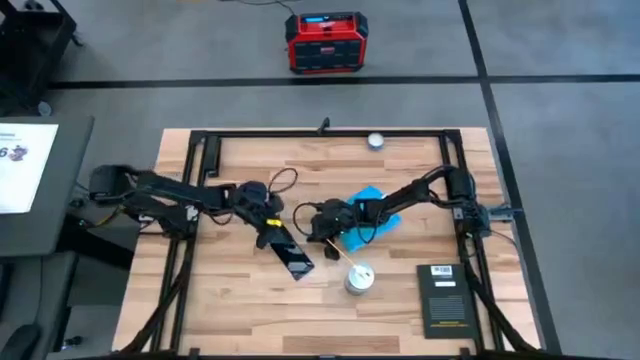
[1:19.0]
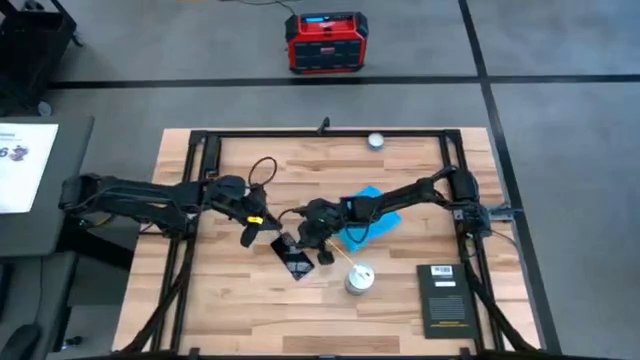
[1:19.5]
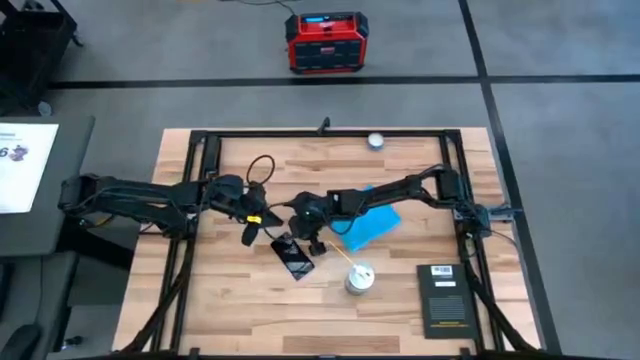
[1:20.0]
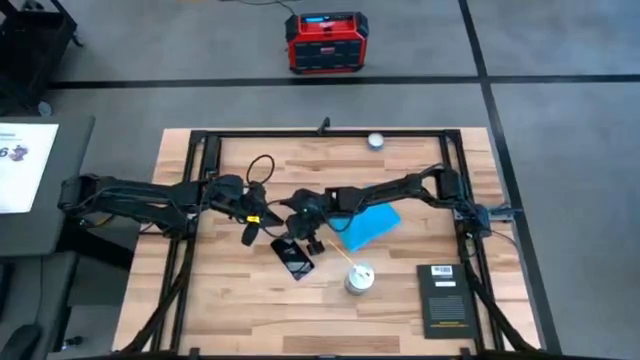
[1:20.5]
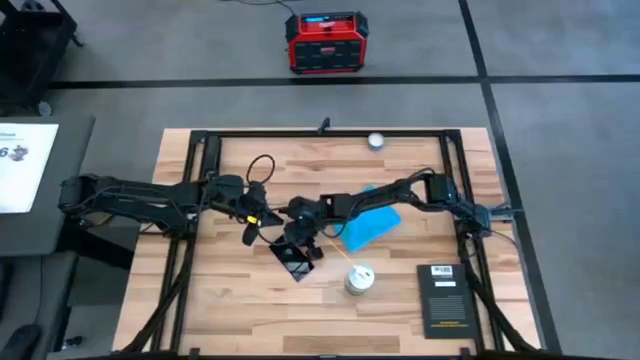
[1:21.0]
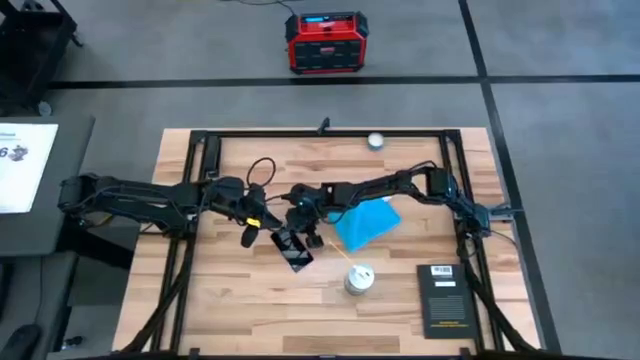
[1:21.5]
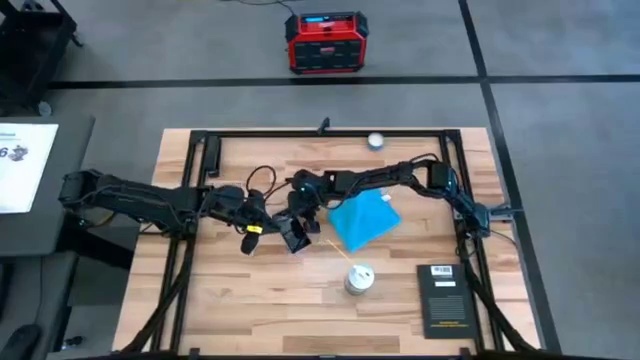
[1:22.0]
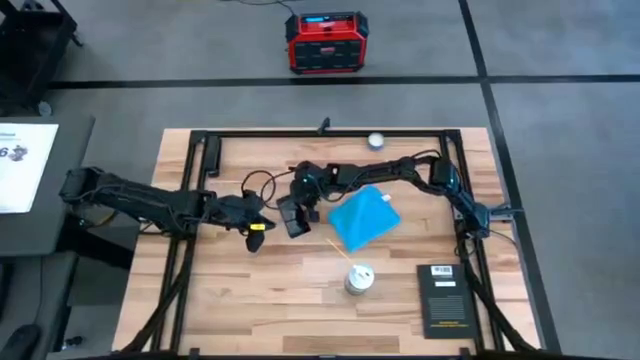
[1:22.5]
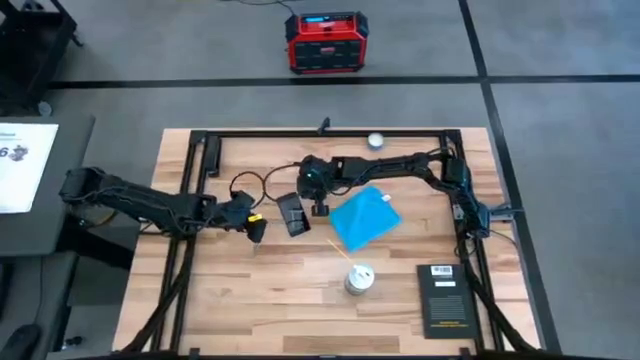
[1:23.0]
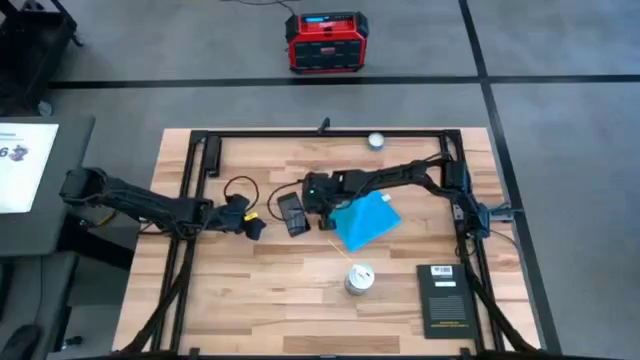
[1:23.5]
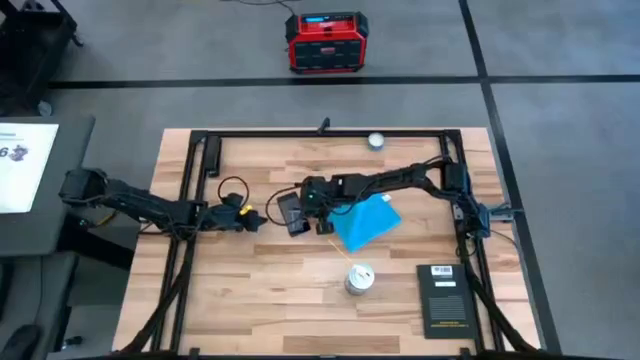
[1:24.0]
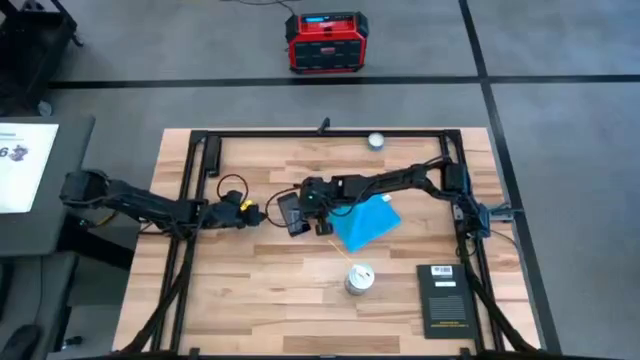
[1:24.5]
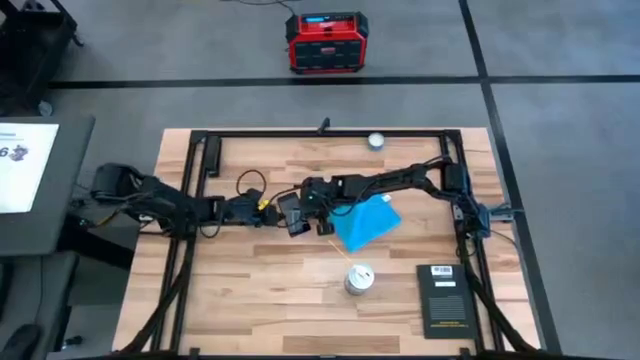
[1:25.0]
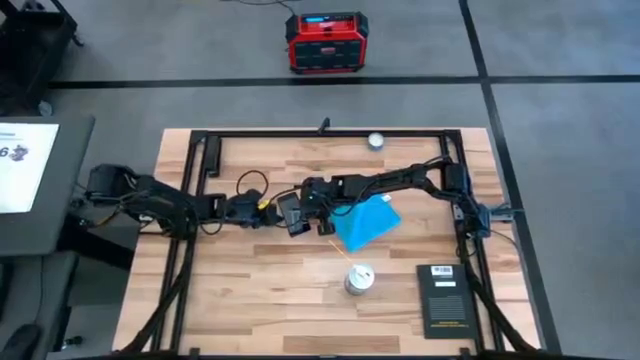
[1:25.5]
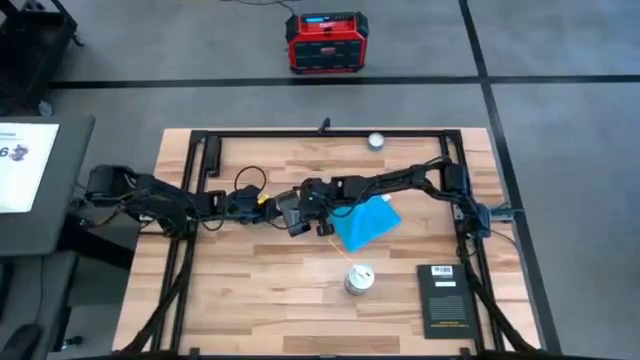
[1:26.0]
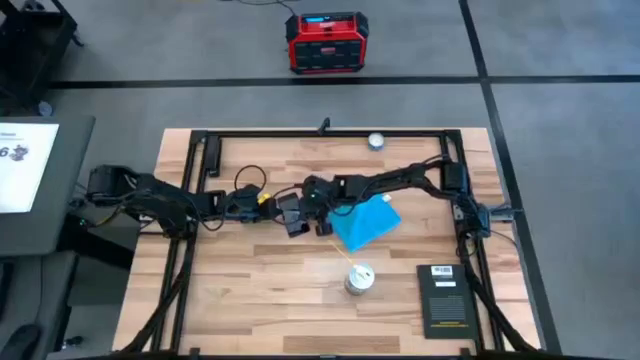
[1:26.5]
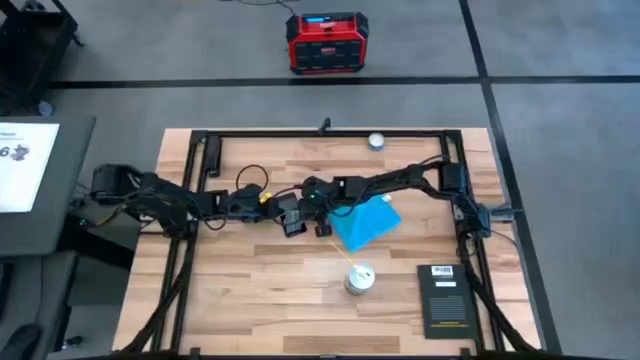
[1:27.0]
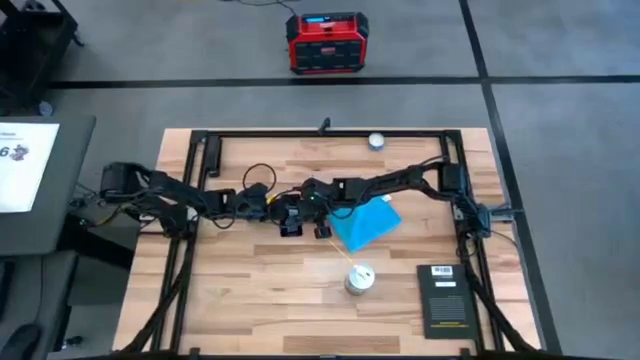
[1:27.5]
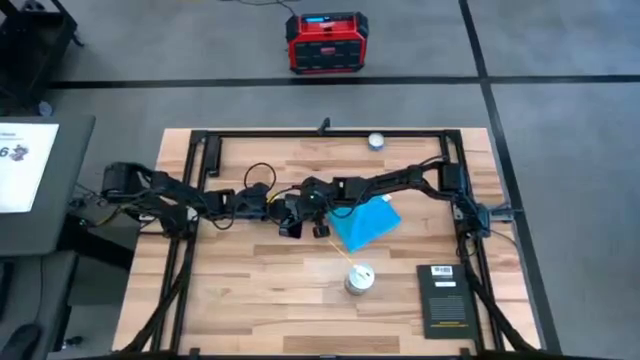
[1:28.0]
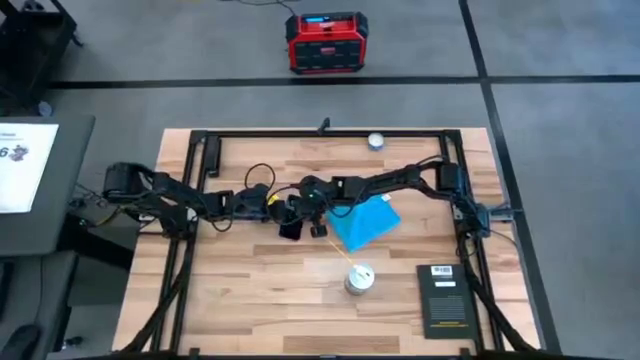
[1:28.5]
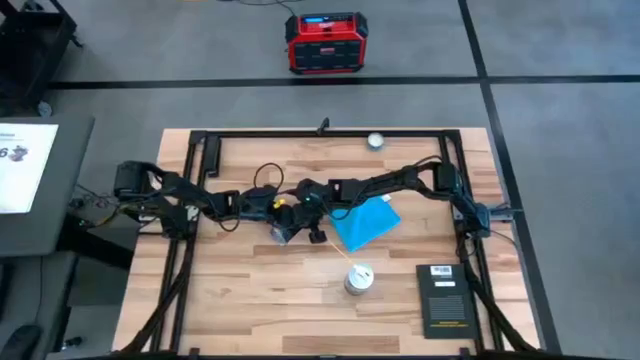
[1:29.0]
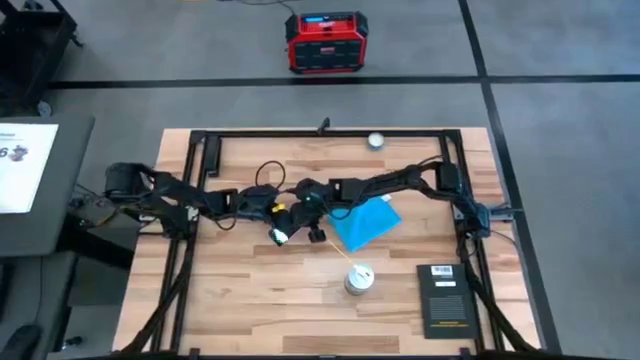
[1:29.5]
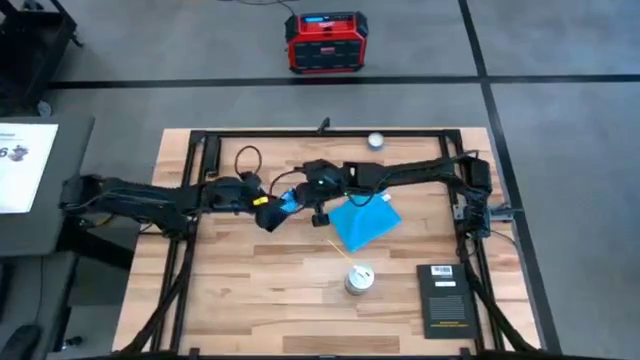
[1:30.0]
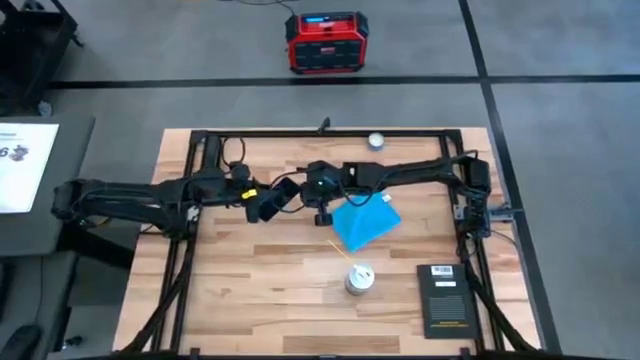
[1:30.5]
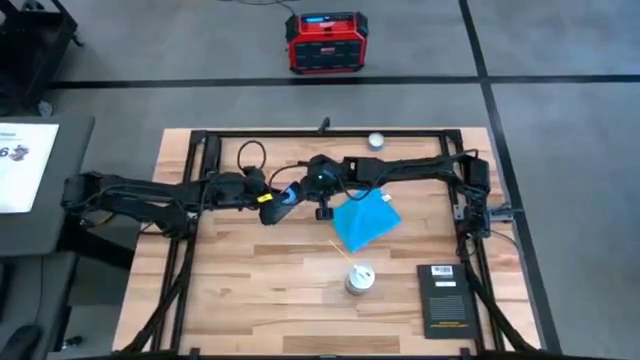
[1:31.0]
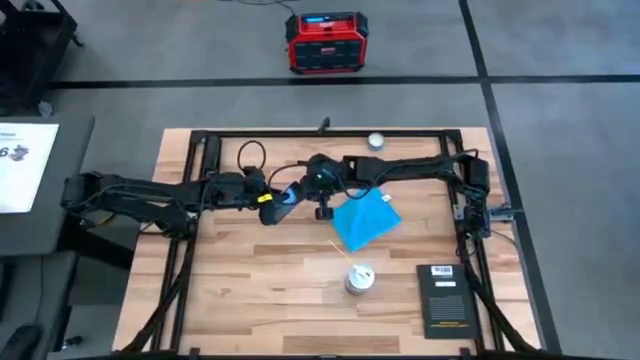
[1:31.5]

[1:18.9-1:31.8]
Task: Apply microfiber cloth
Spray the device using the spray bottle

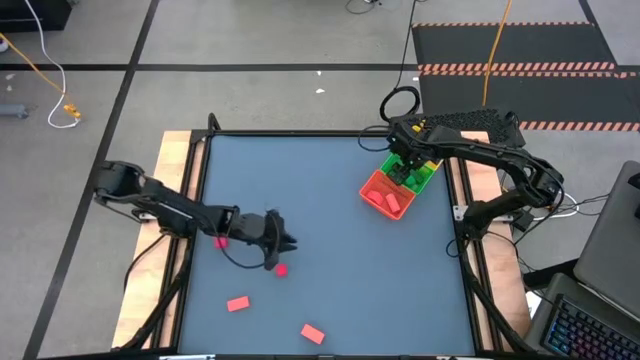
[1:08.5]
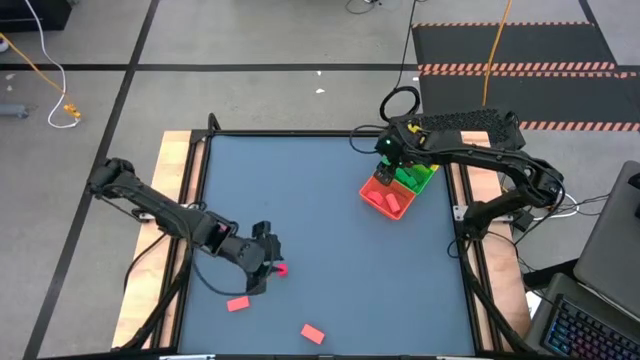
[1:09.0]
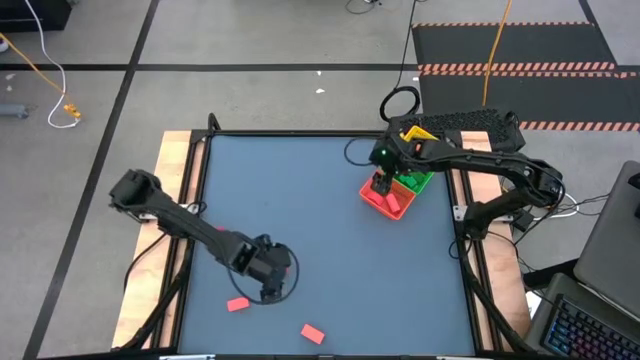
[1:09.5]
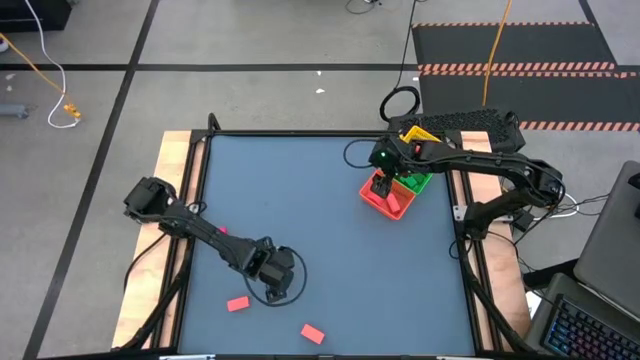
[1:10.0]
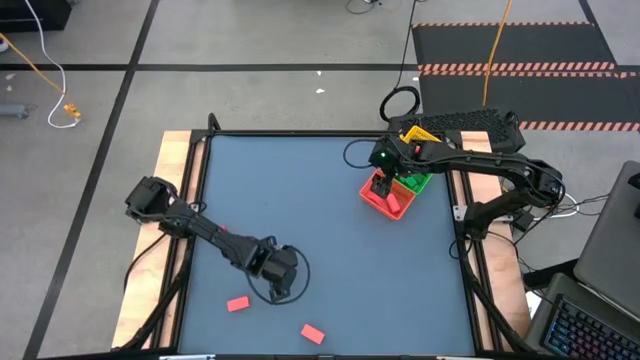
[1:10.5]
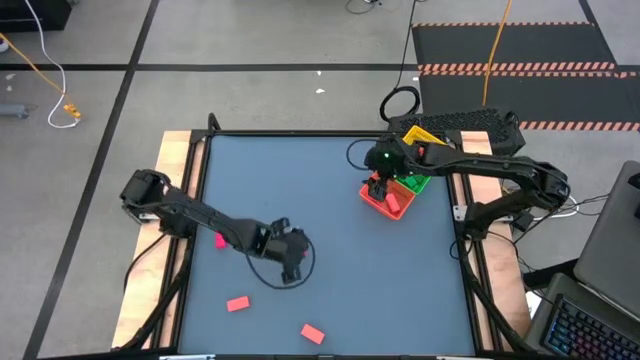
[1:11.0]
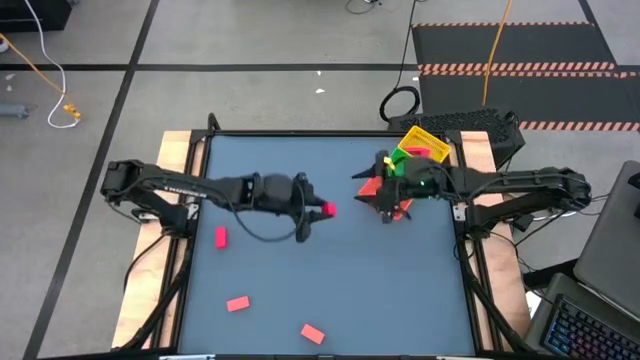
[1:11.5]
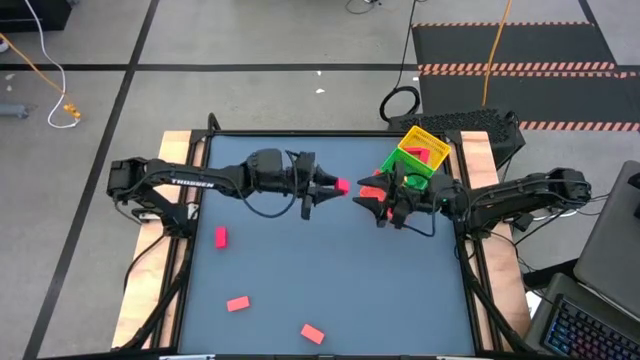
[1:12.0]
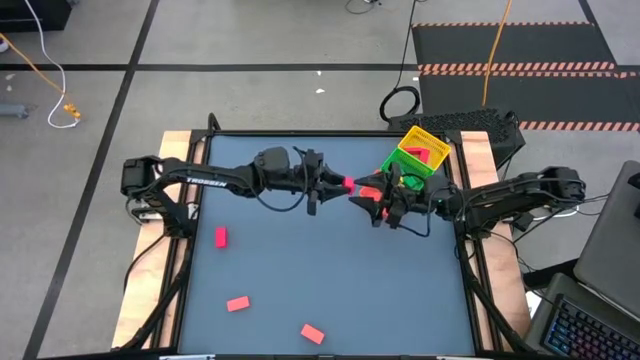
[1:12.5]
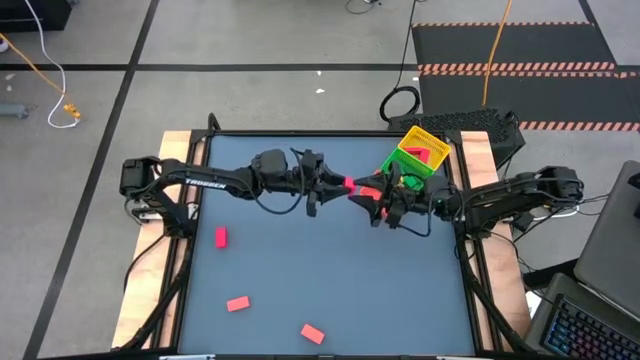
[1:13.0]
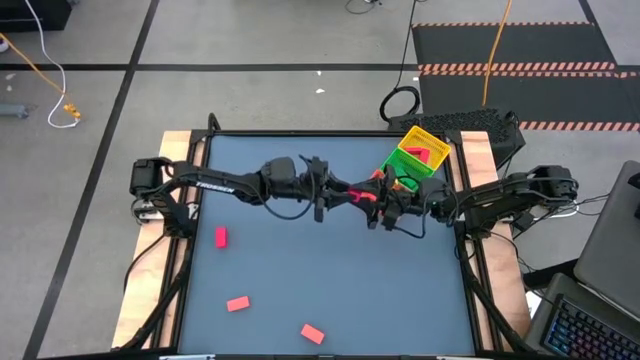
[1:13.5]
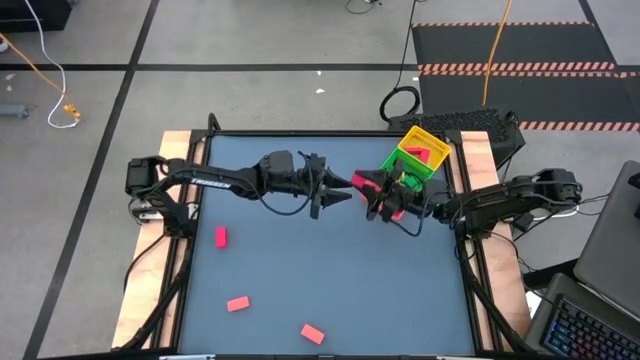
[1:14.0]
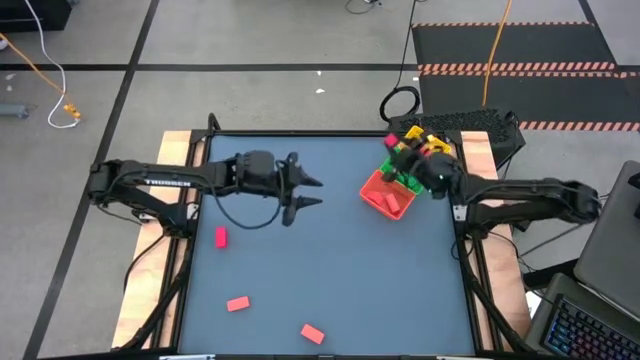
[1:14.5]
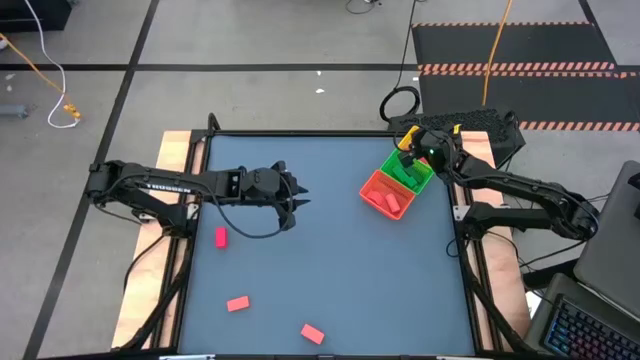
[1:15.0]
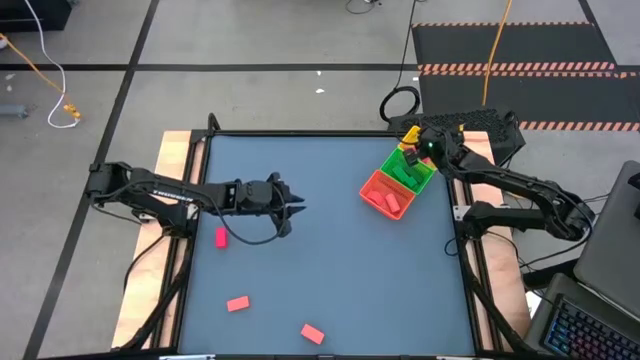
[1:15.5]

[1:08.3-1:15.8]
Task: Sort & place blocks by color
Put the red block into the yellow bin
